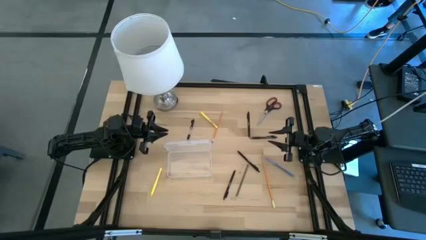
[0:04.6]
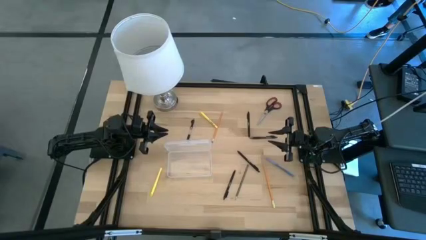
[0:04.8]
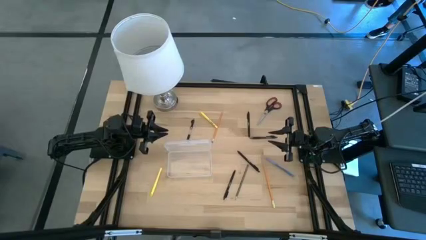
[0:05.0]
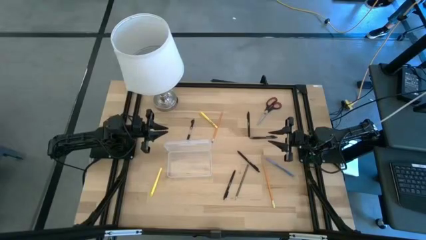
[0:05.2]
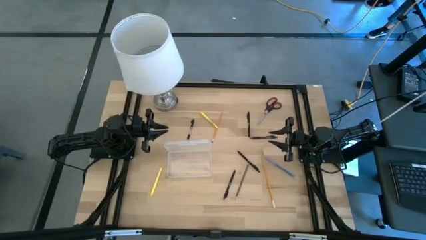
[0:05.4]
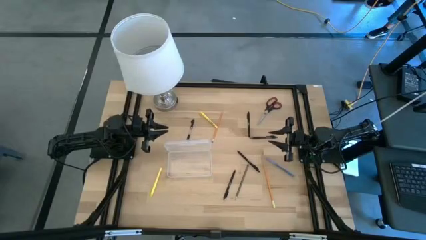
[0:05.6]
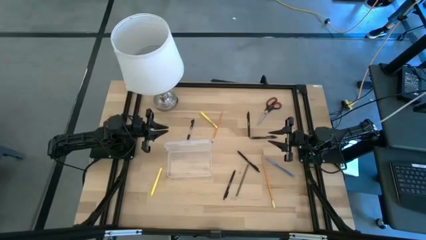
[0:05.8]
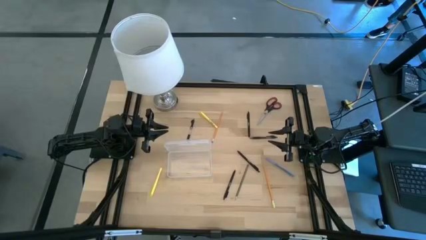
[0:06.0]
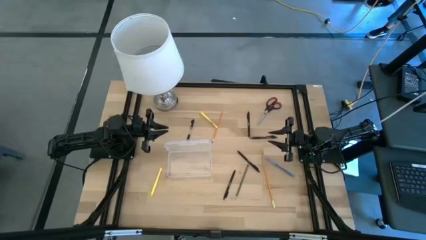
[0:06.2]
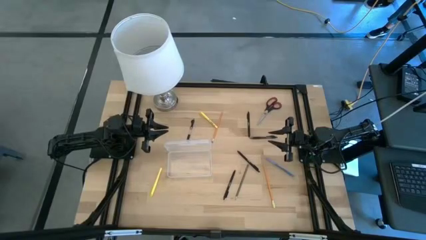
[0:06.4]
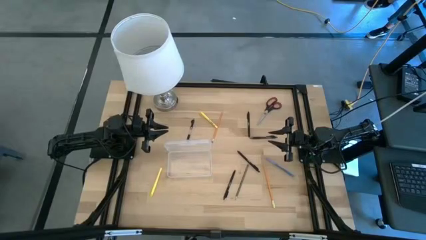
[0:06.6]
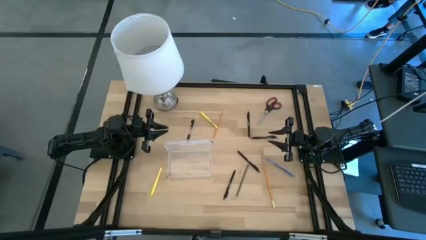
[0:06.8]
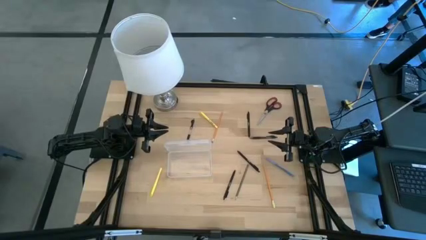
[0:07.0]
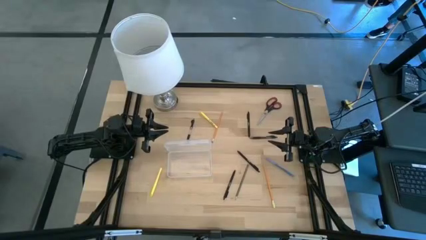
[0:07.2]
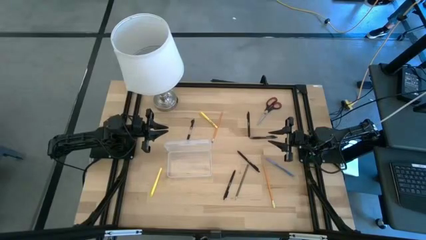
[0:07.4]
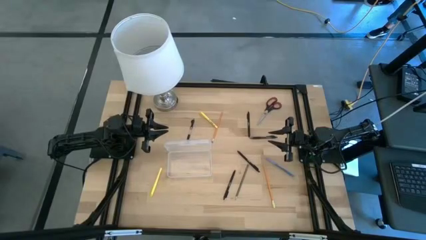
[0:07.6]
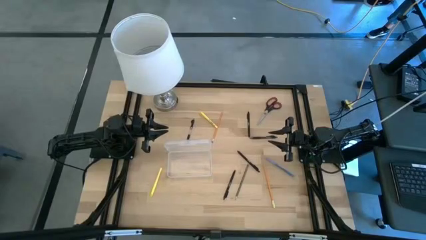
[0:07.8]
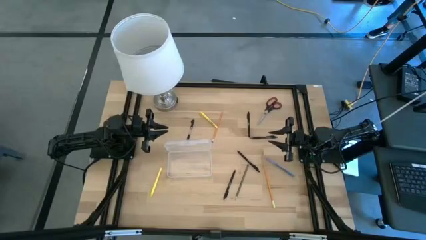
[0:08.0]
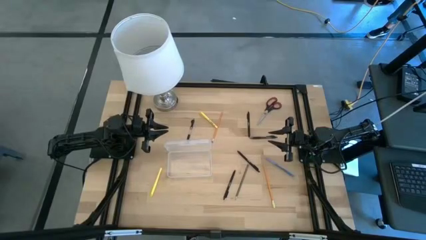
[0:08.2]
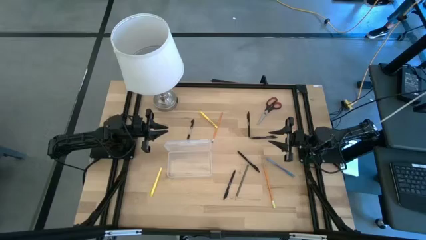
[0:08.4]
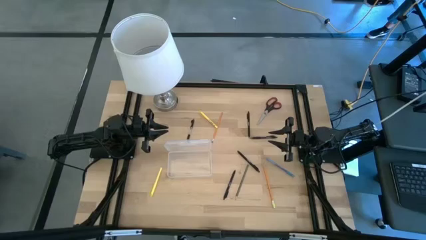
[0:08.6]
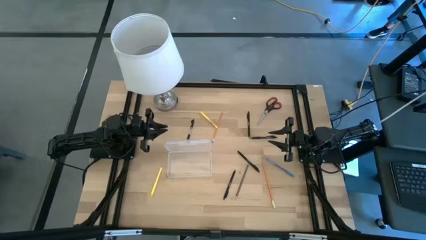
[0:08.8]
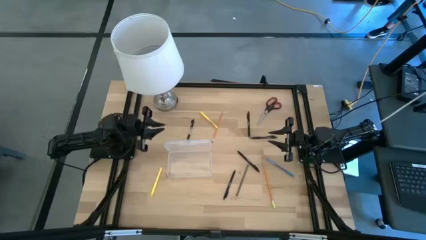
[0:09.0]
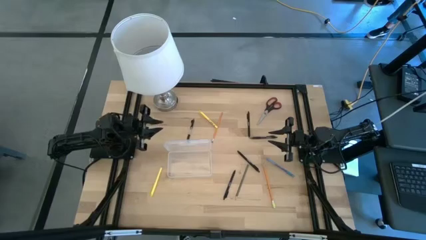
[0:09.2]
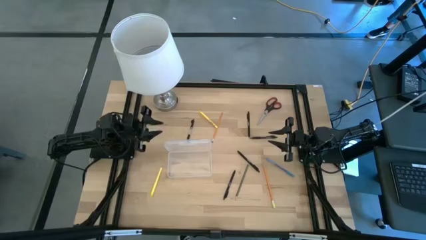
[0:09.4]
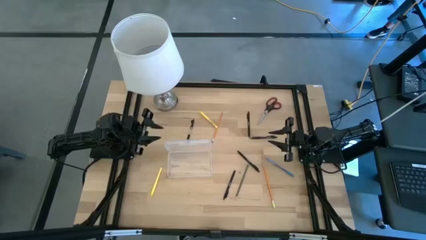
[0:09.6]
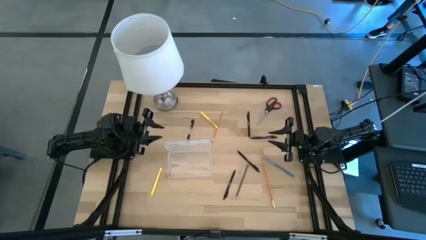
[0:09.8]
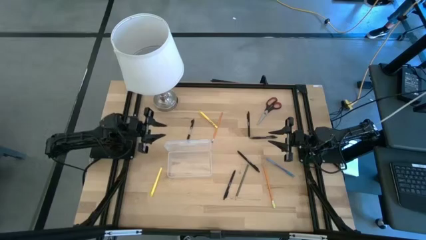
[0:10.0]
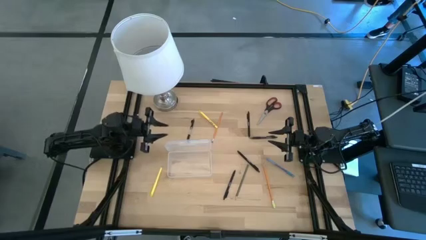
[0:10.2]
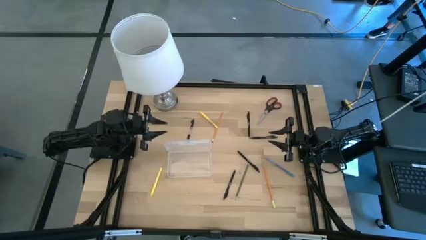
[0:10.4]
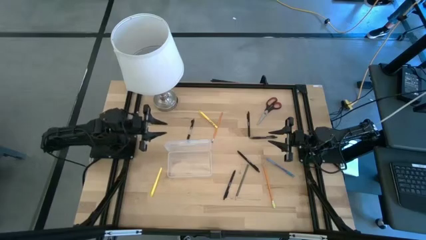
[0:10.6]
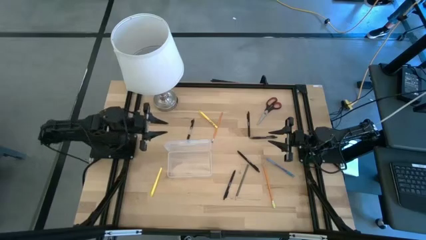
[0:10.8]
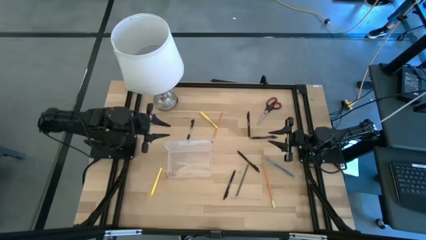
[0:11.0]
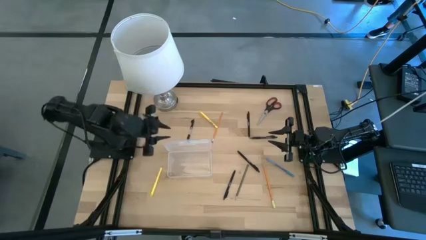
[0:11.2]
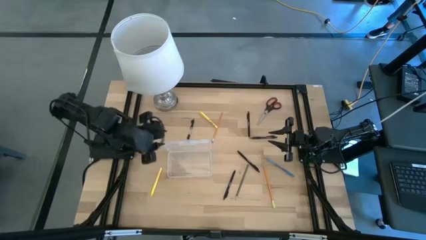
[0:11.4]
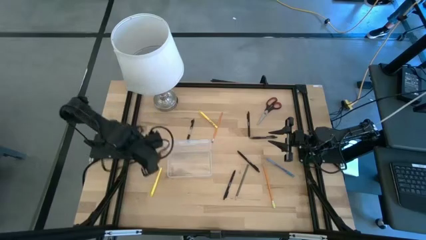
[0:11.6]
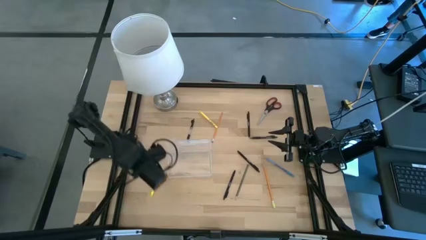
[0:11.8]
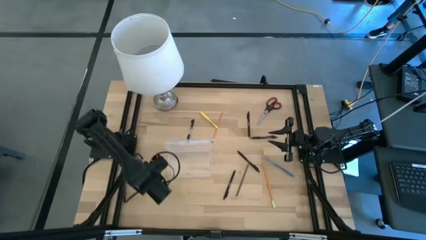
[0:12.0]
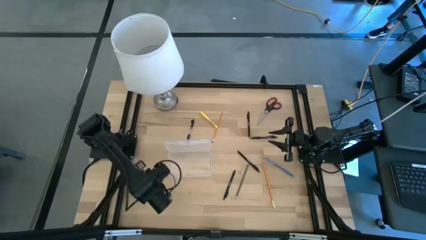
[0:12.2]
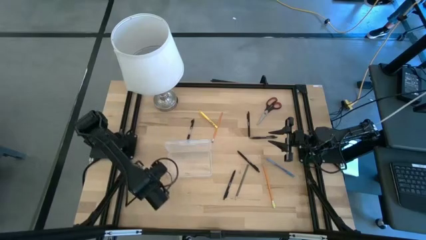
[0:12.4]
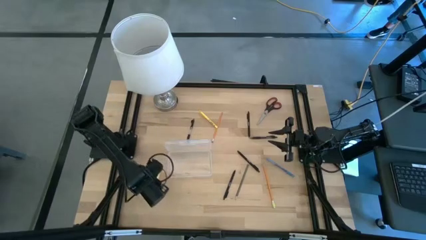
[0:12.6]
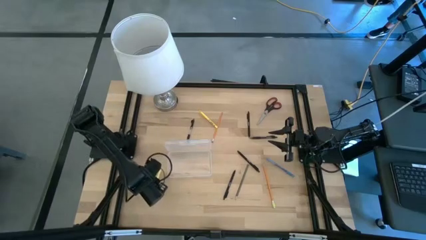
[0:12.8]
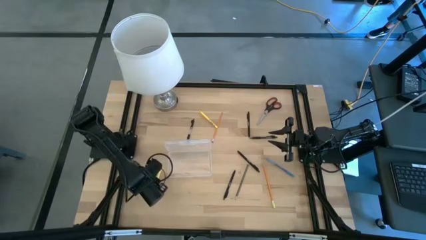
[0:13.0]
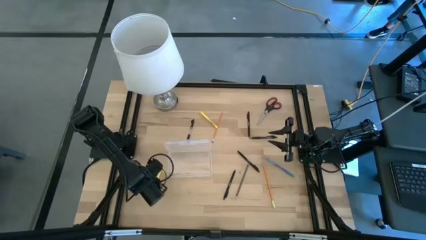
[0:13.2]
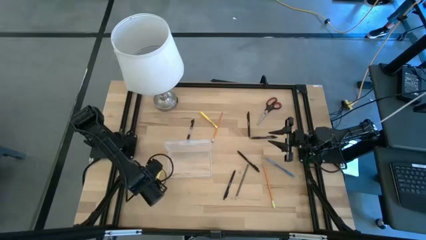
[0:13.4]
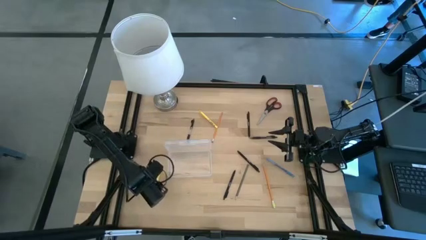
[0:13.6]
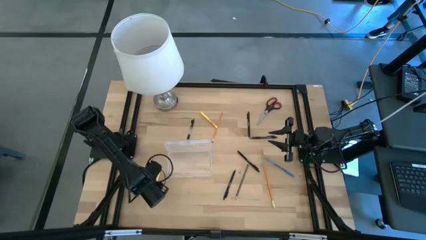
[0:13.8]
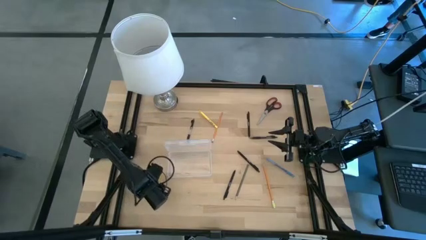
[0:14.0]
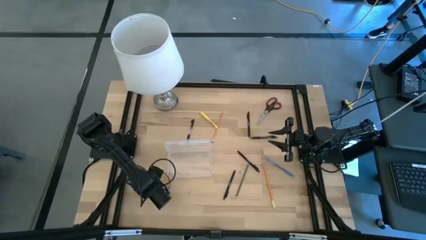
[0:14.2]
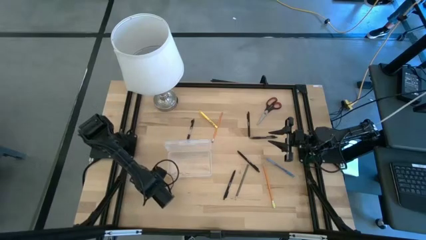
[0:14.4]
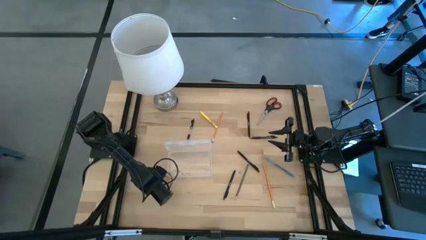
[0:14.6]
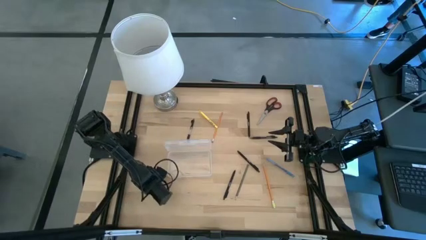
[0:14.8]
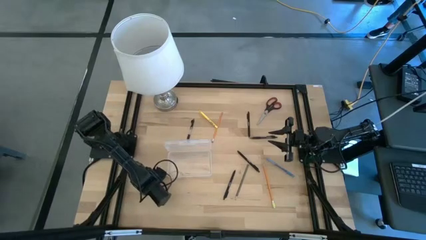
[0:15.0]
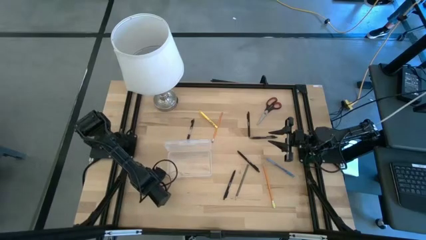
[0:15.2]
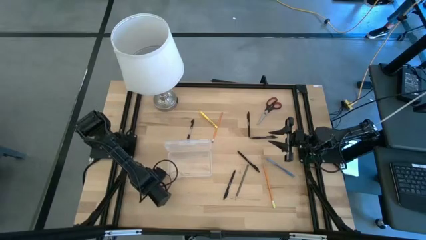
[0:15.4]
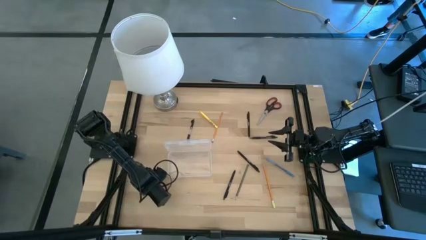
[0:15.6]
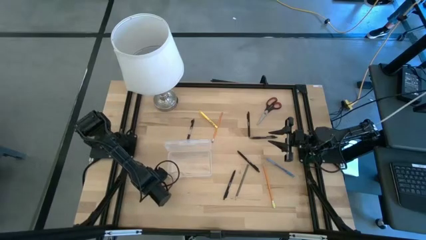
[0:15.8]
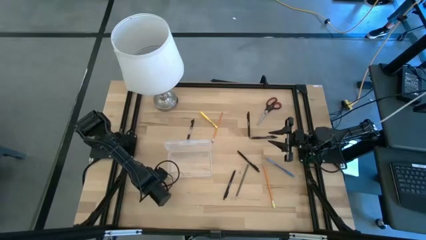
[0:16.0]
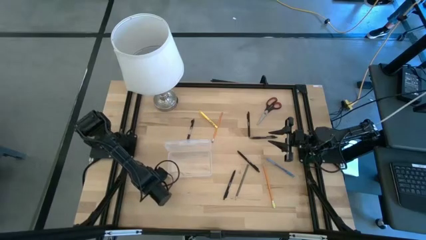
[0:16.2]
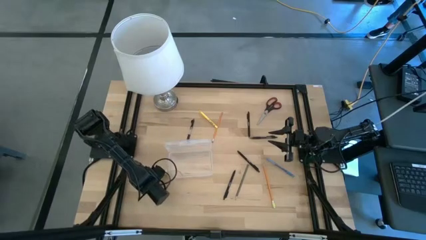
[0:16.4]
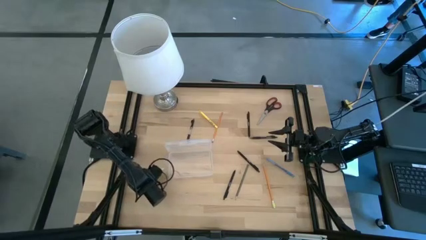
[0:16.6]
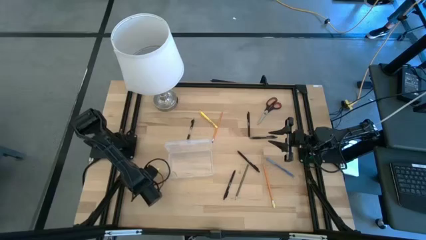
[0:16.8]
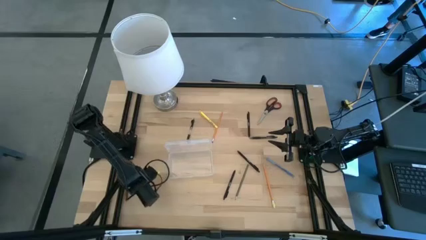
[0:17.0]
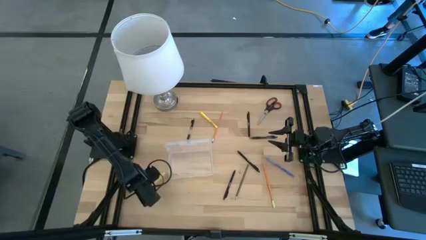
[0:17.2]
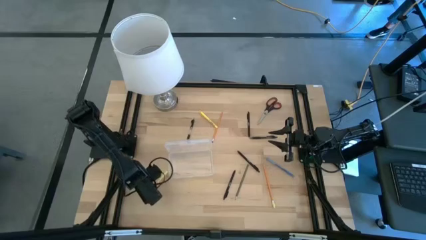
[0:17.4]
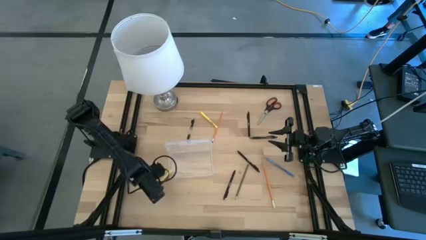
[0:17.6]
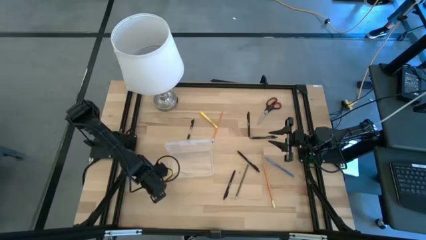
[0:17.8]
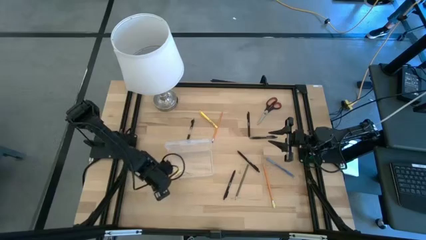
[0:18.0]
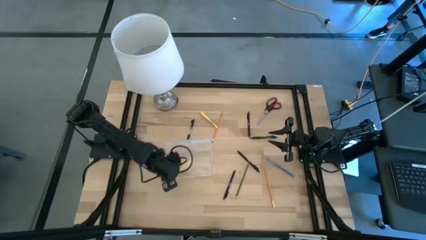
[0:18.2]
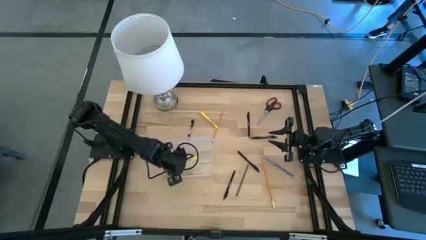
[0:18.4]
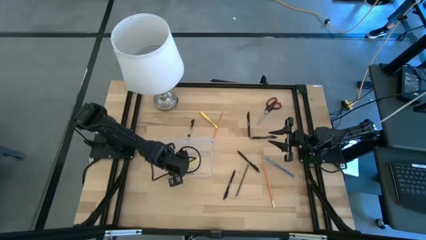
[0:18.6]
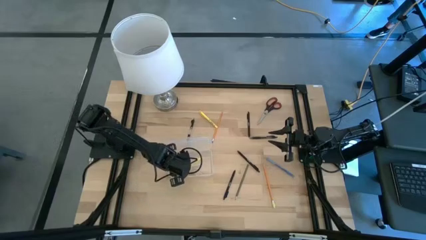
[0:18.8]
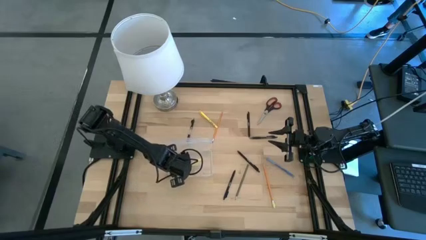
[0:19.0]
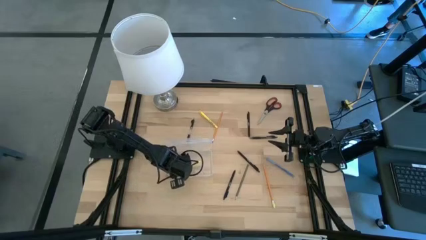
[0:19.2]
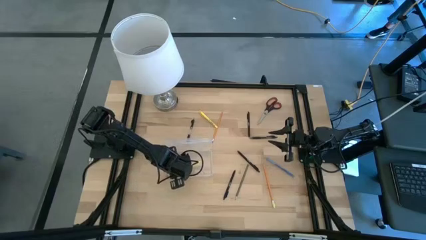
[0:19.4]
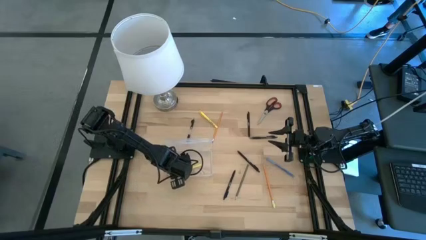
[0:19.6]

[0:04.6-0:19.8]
Task: Pick & place school supplies into a supply box
Put the bottom yellow pen into the transparent supply box
